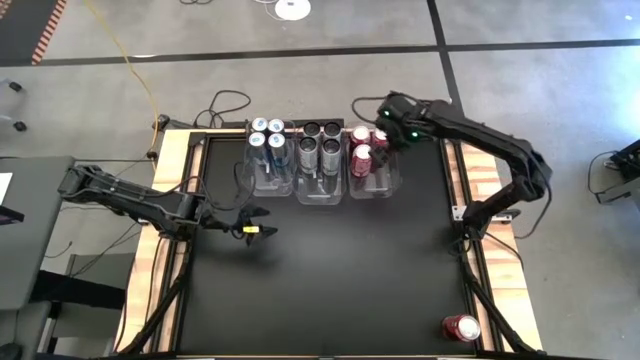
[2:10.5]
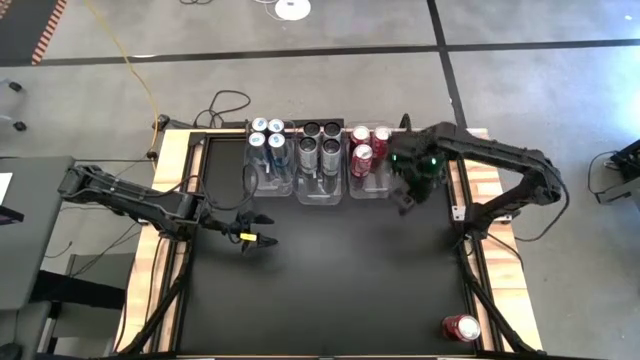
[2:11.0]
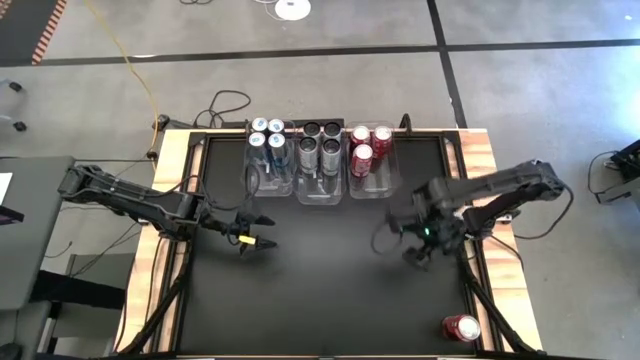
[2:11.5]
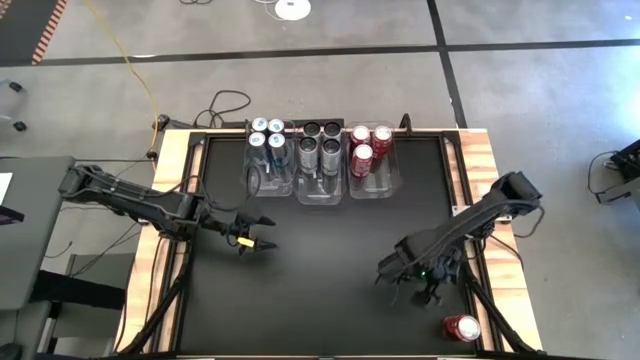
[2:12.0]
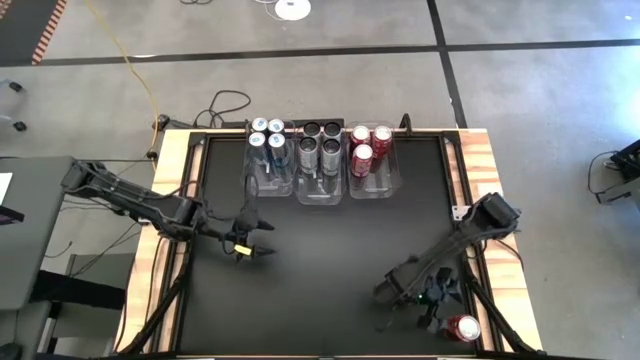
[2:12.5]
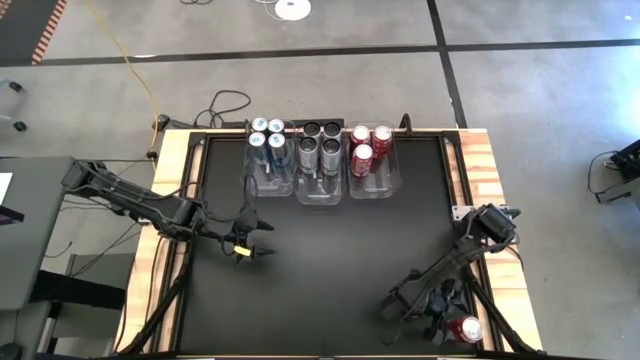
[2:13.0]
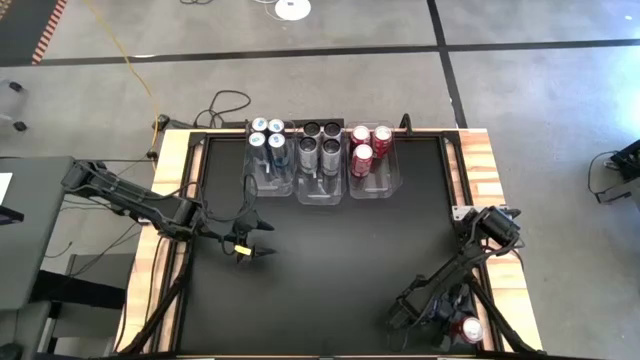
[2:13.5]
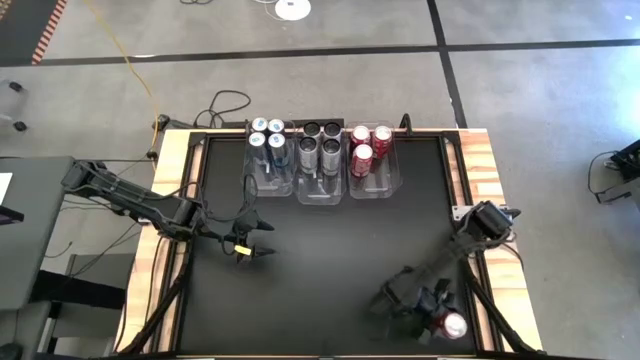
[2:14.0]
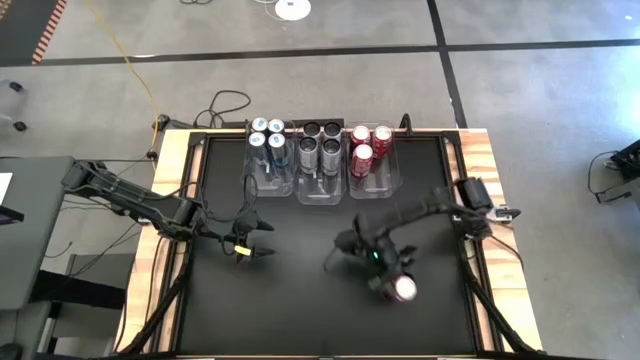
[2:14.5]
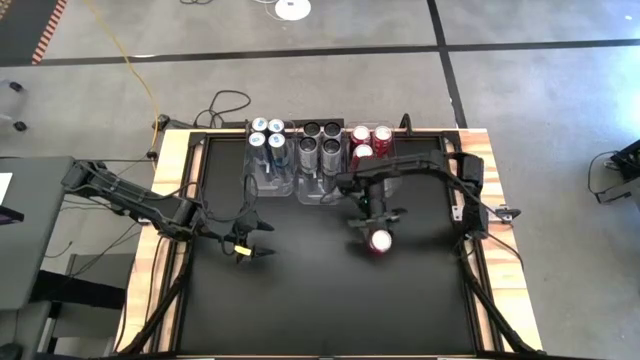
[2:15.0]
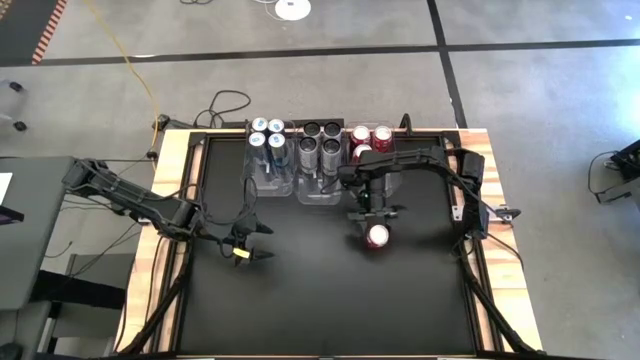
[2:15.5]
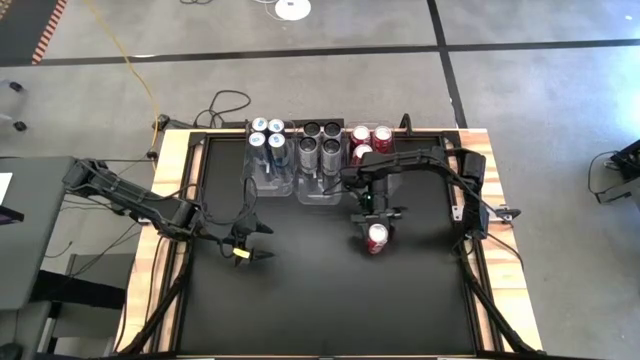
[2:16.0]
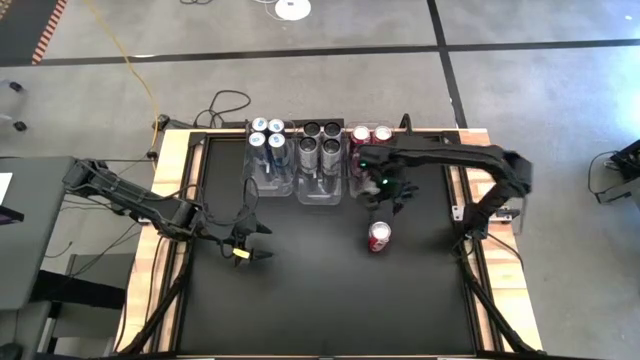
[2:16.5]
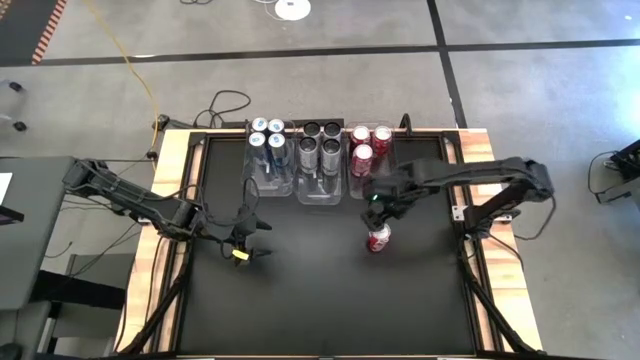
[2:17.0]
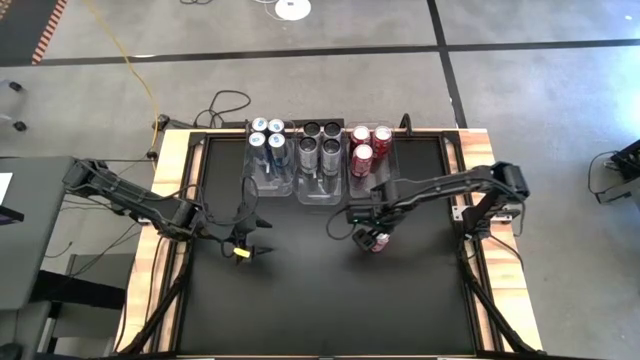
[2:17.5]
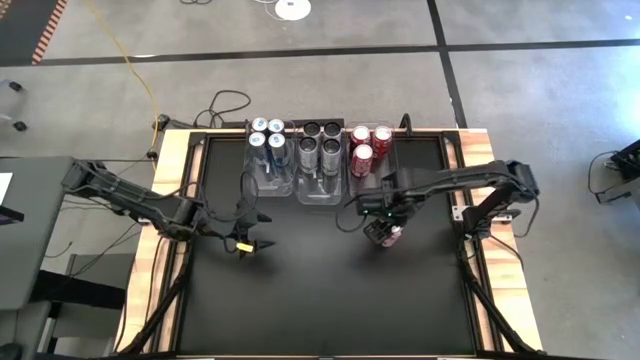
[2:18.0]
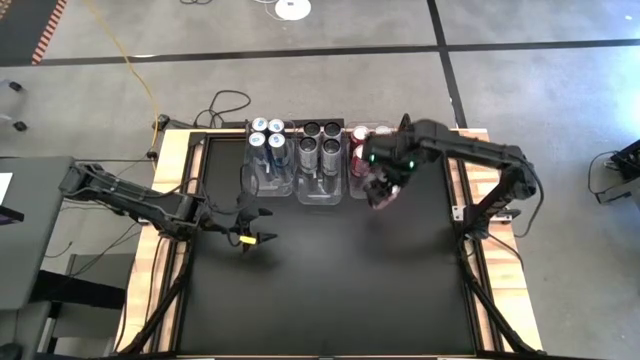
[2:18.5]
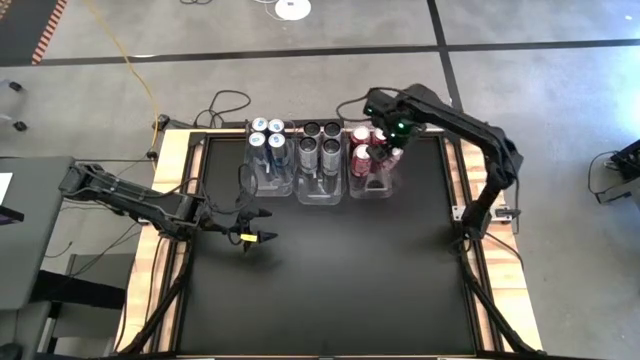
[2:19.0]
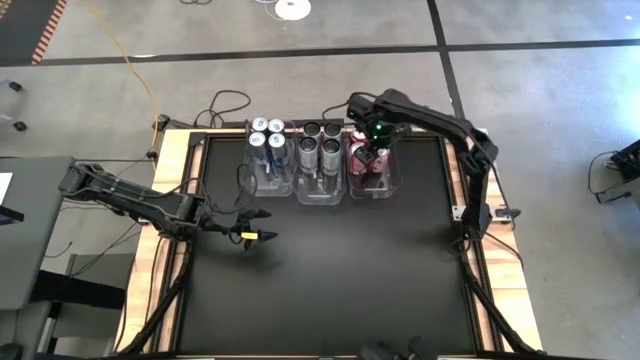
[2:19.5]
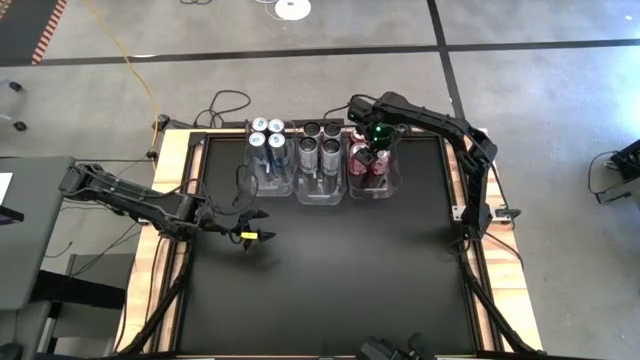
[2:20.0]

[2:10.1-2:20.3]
Task: Sort soda cans
Put the red soda can into the right transparent bin

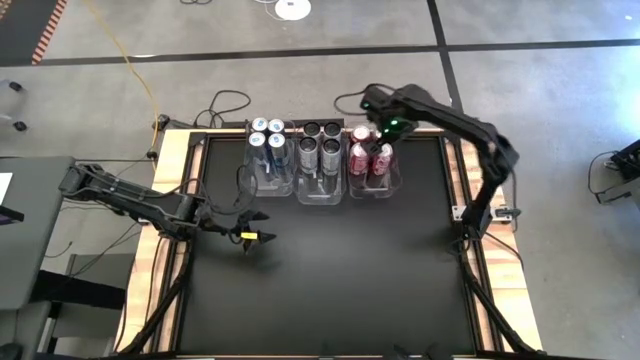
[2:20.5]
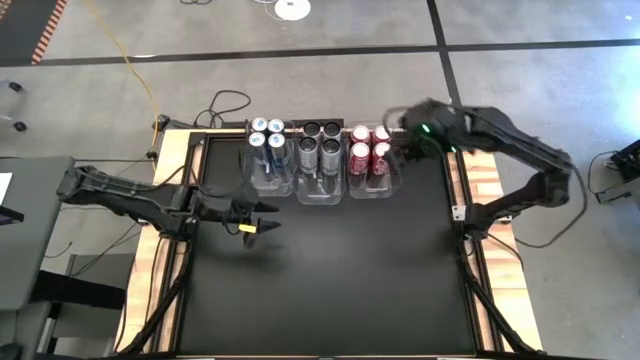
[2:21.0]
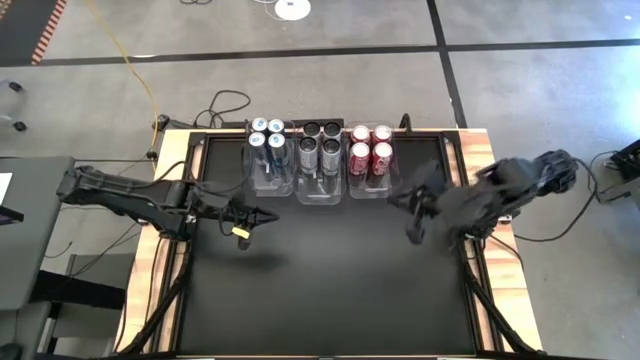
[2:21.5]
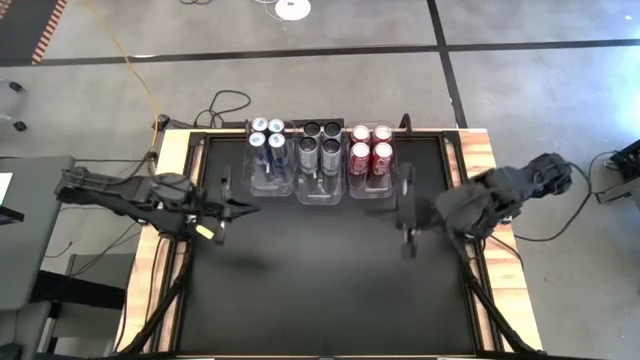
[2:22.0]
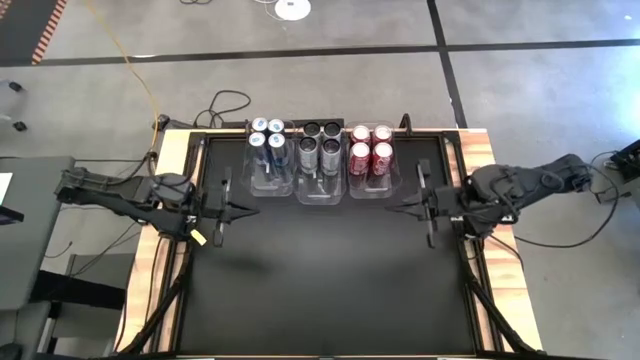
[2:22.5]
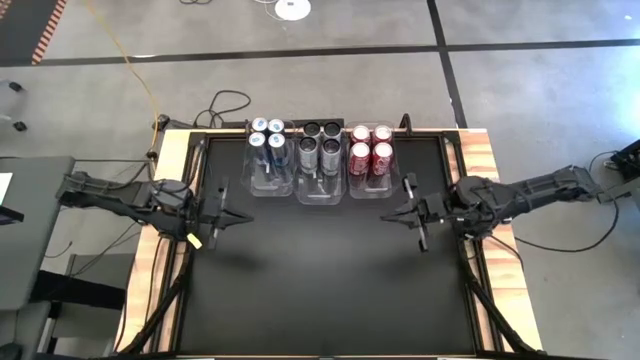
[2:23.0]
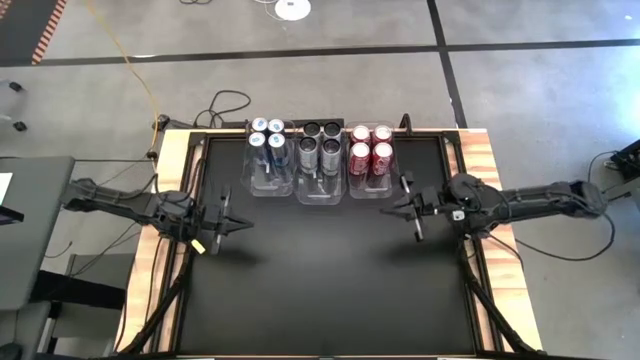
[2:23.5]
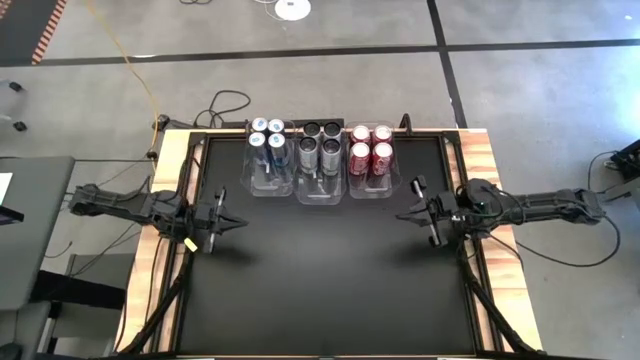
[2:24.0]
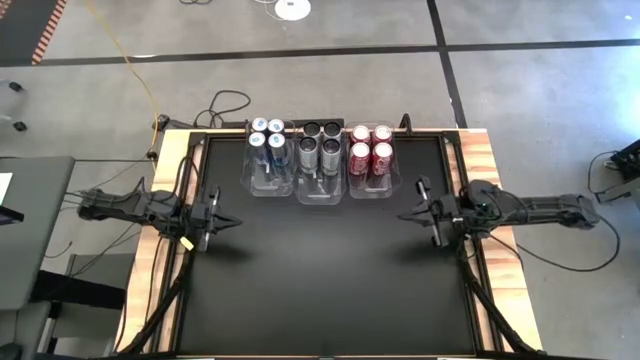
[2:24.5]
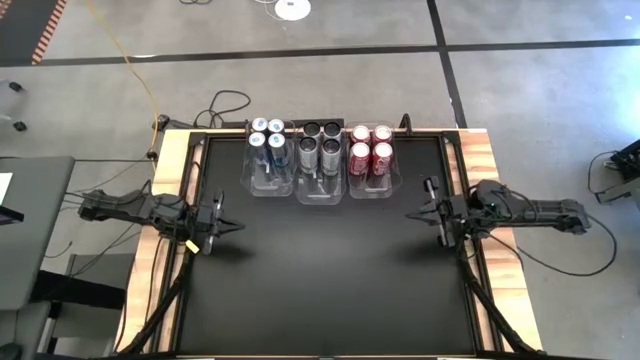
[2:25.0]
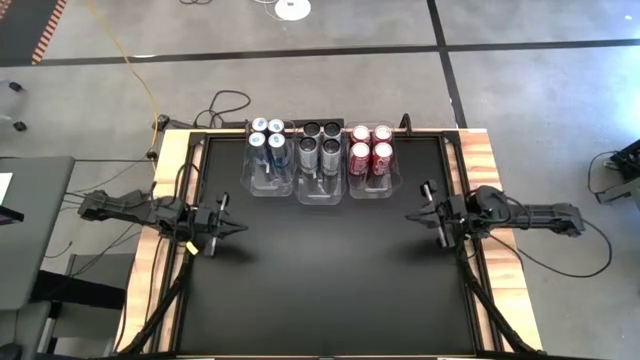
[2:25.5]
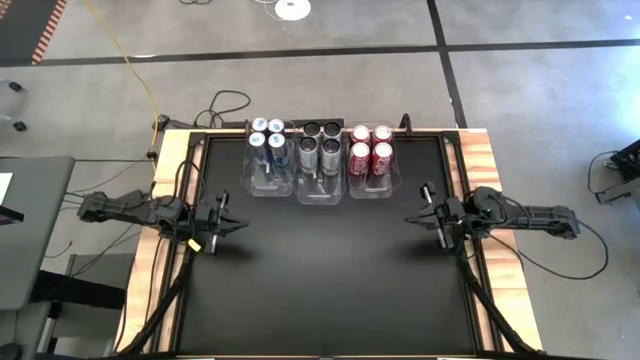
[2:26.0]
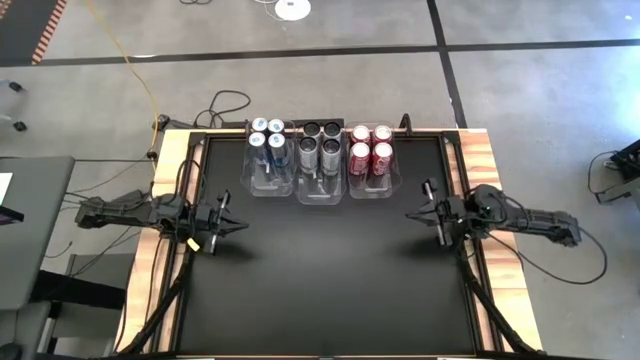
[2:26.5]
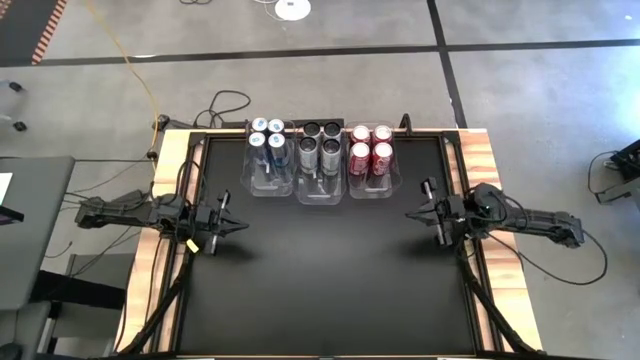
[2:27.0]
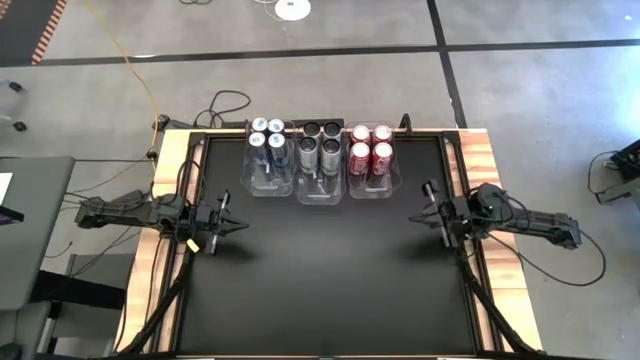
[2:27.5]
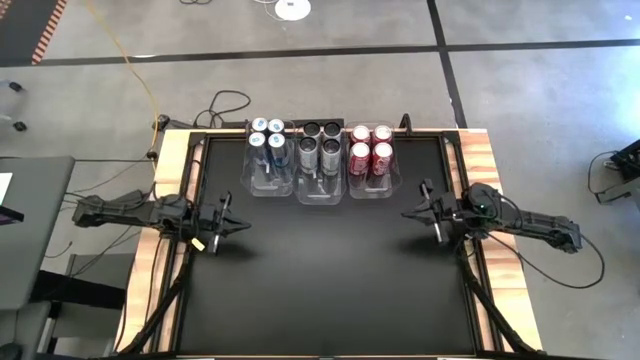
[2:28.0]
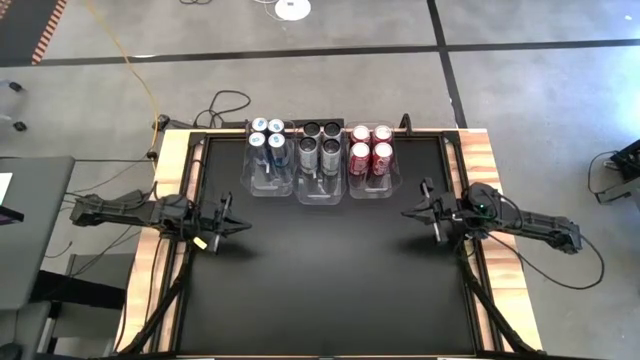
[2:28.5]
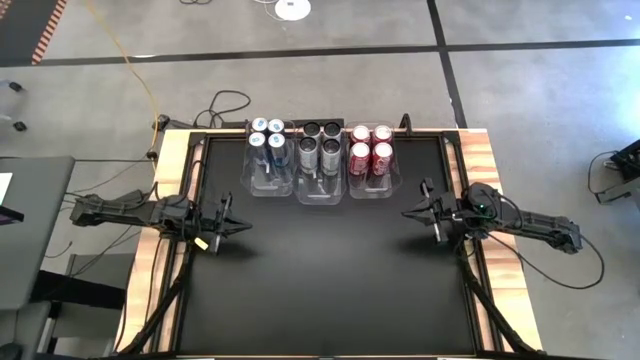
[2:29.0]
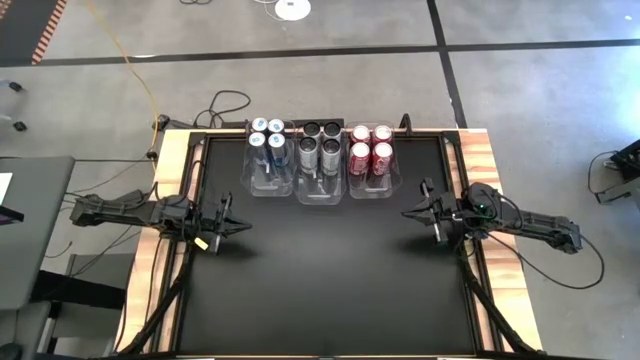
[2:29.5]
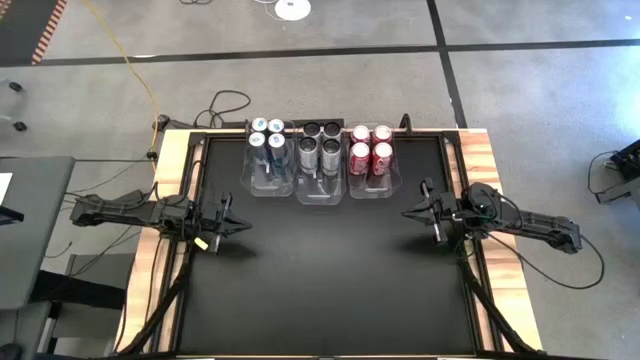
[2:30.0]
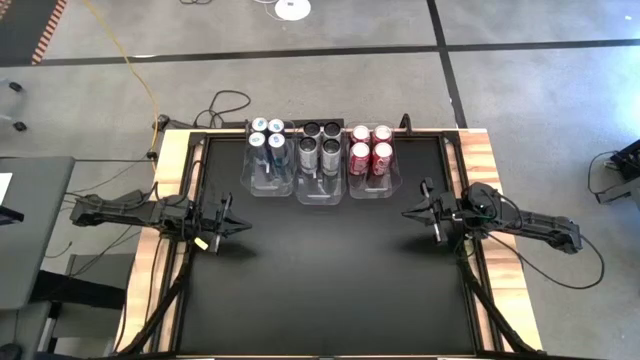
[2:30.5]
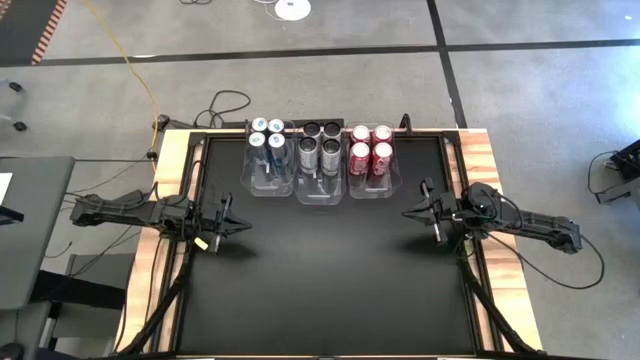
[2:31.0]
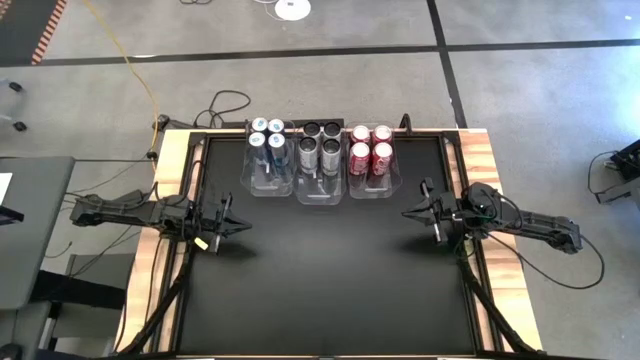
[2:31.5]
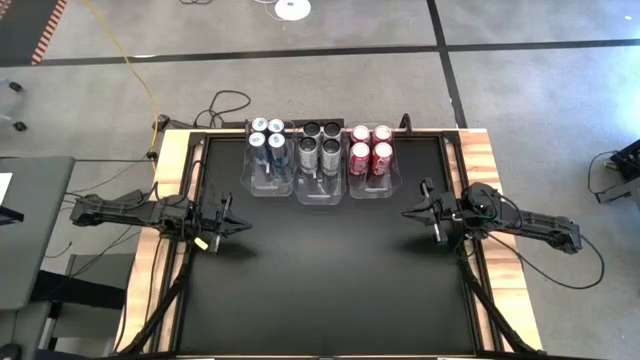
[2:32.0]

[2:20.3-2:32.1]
Return to Home Position
